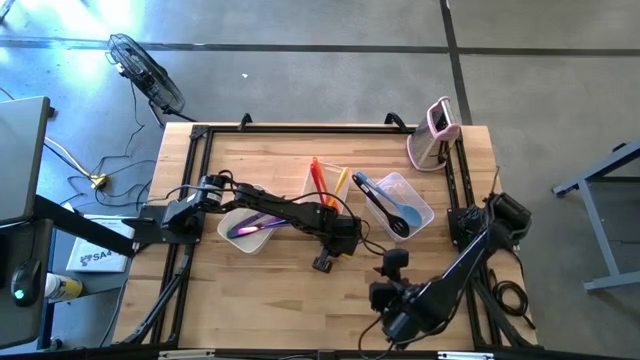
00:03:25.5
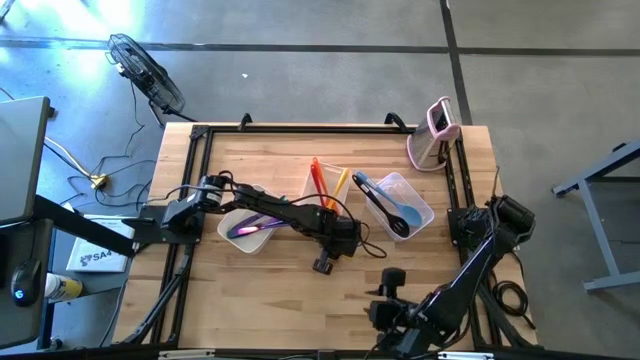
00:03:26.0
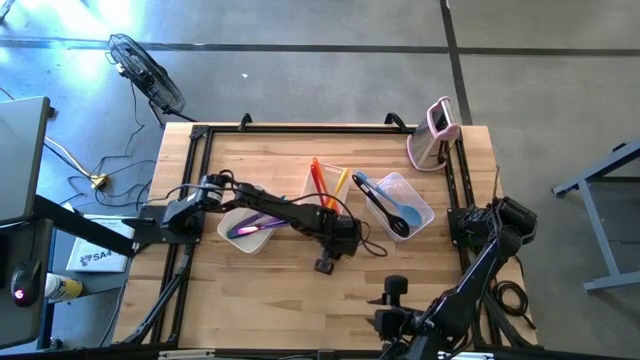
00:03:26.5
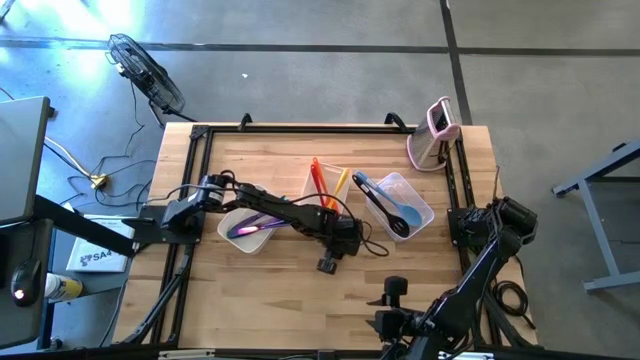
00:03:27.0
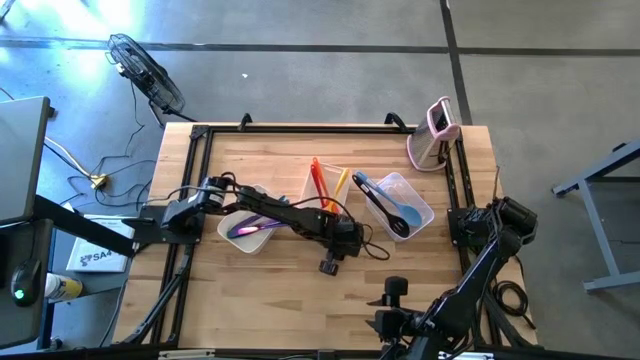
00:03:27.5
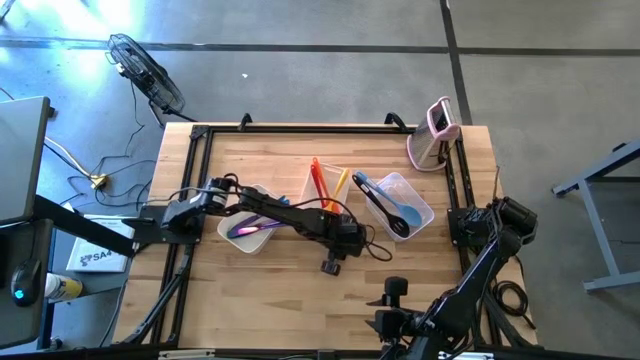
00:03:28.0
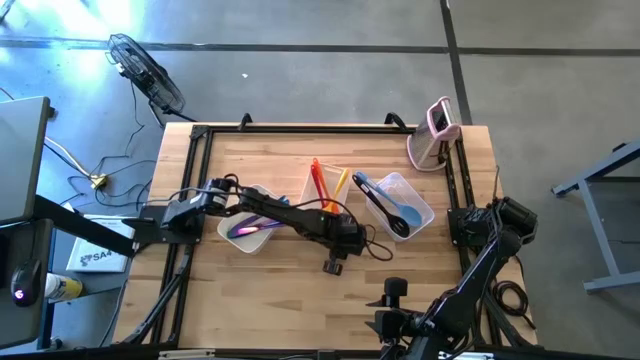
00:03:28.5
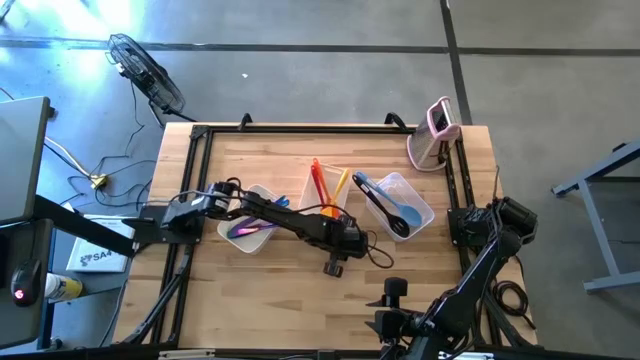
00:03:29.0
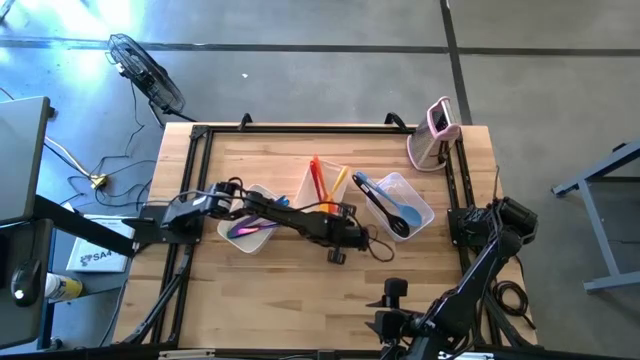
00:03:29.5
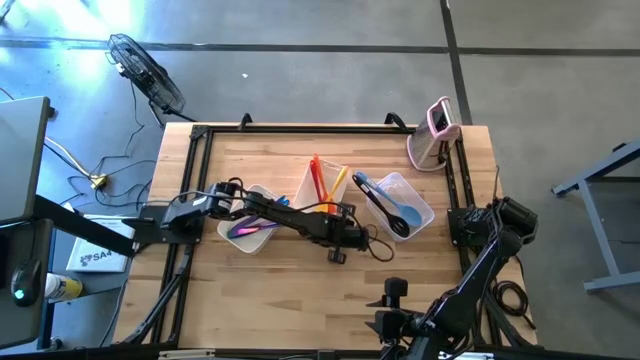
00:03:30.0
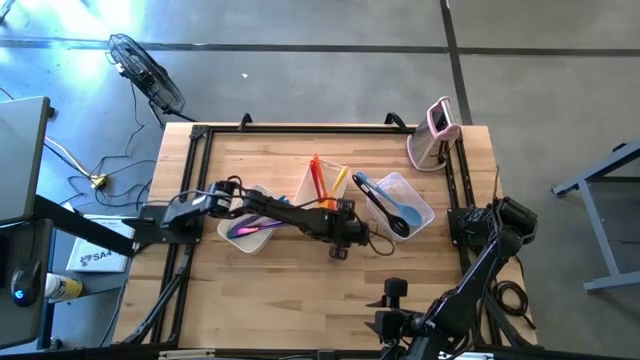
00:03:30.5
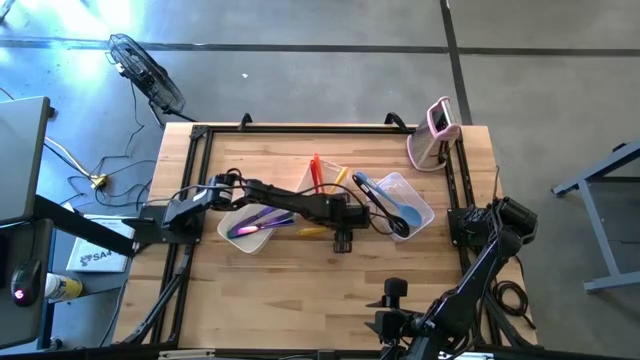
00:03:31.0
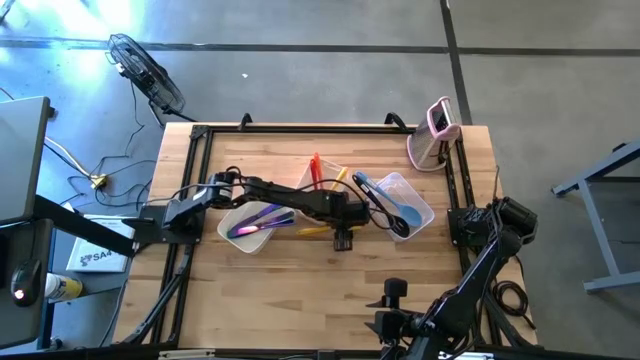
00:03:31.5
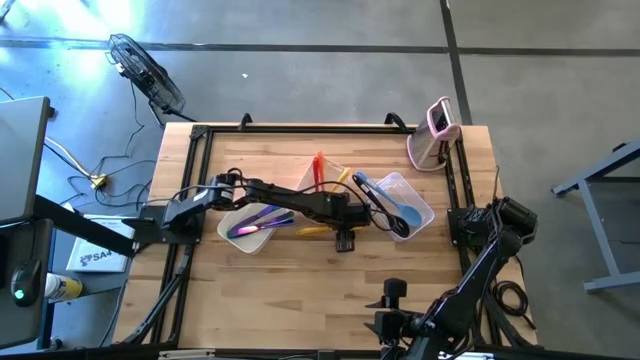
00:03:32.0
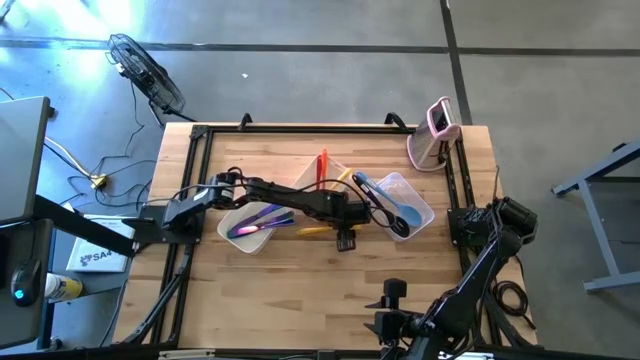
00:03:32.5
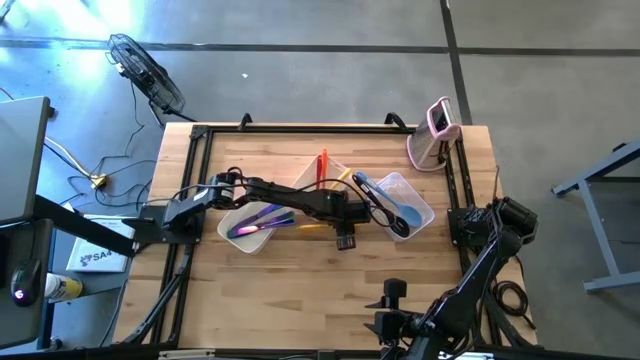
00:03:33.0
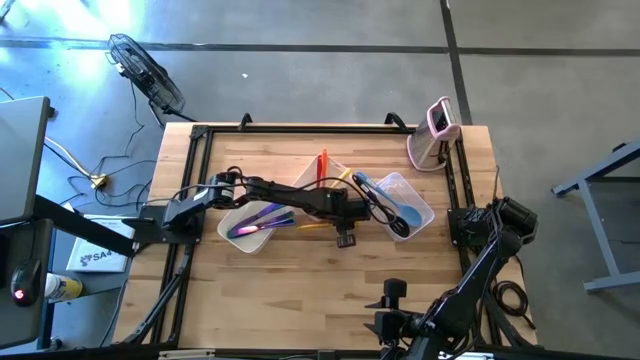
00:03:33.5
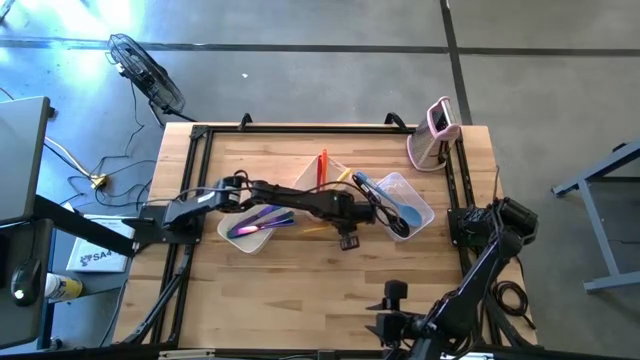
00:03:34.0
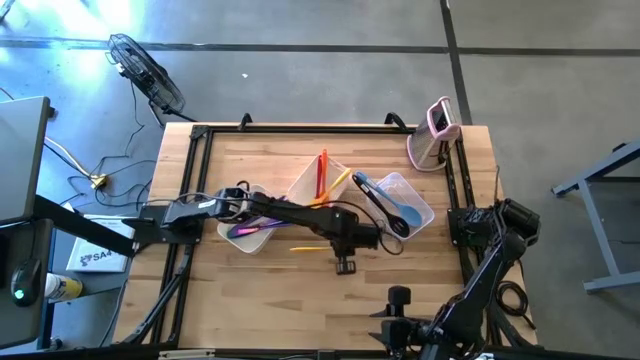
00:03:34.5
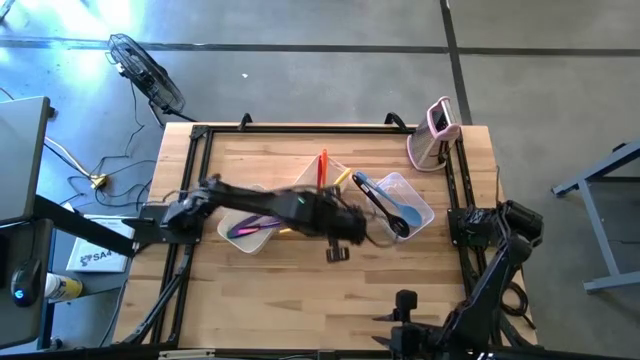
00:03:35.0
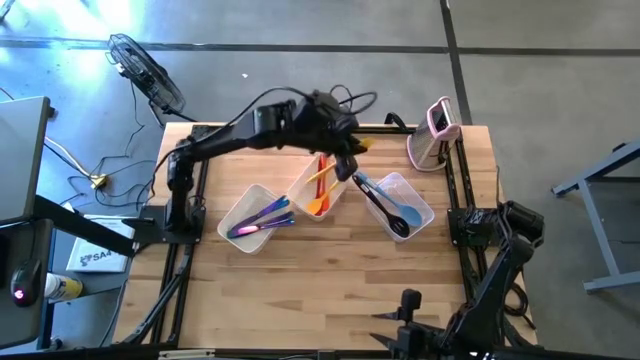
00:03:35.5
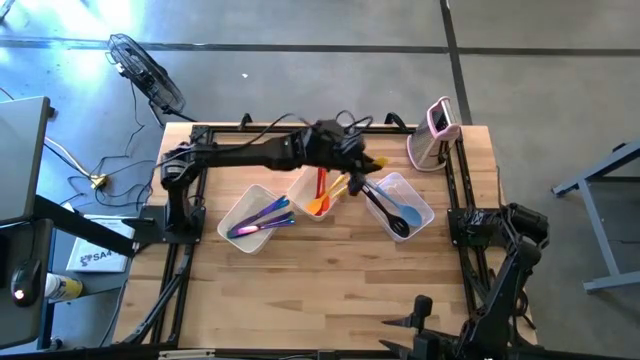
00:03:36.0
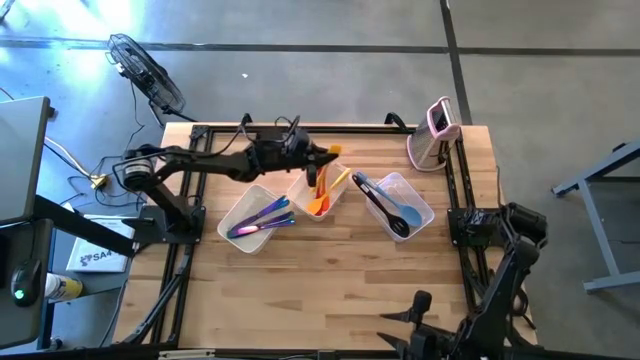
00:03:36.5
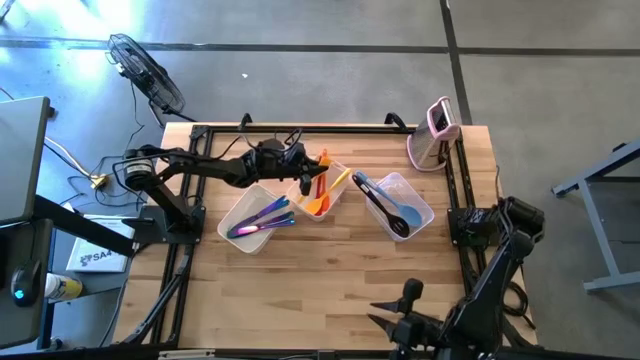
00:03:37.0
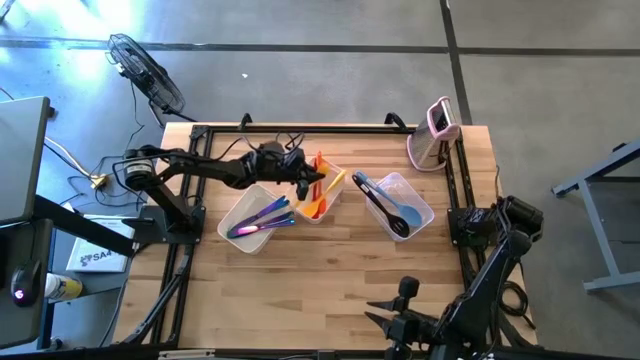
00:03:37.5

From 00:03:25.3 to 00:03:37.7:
Task: Pick & Place Kitchen Items
Put the yellow spatula into the right white bin

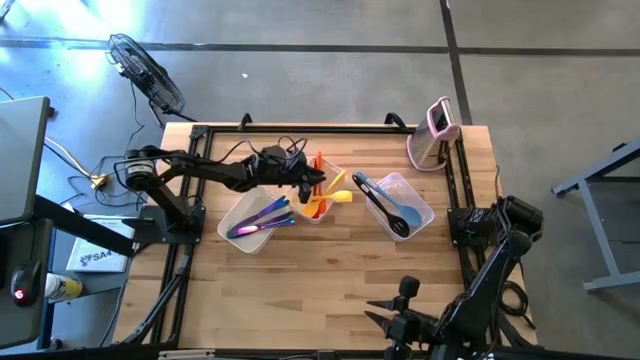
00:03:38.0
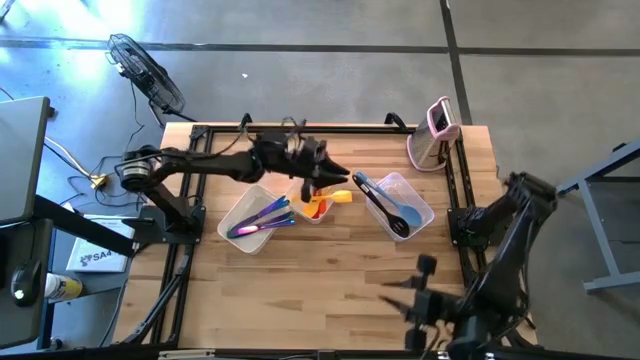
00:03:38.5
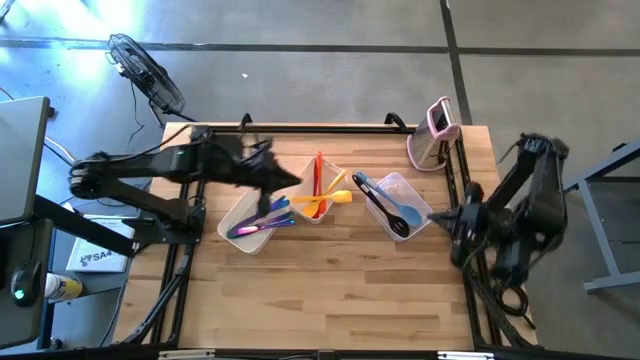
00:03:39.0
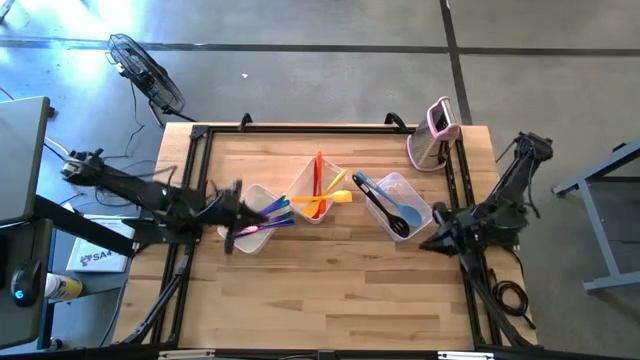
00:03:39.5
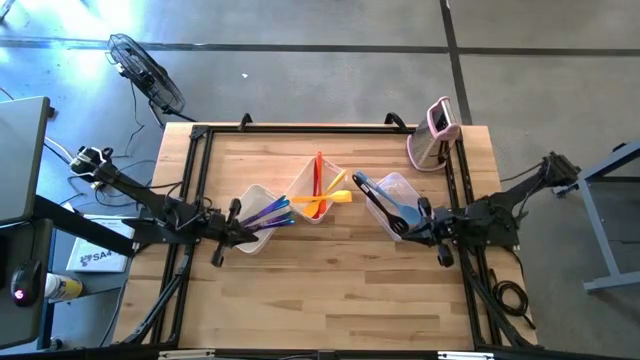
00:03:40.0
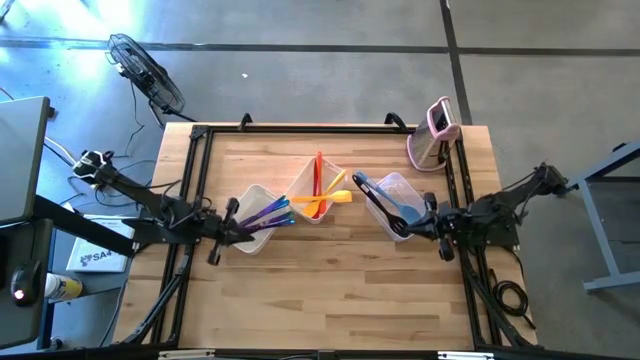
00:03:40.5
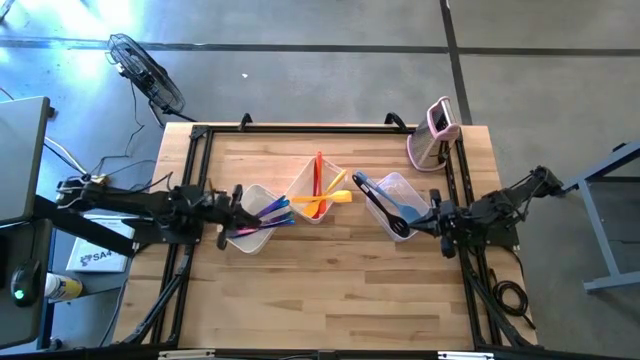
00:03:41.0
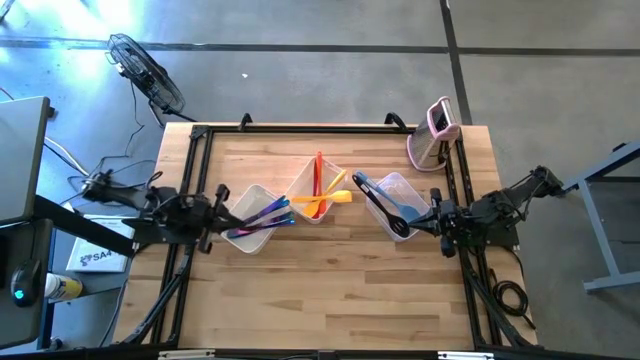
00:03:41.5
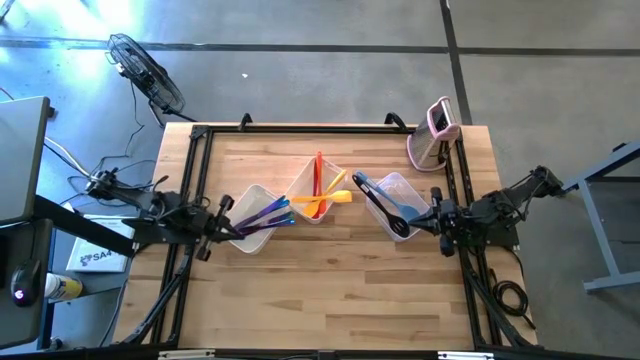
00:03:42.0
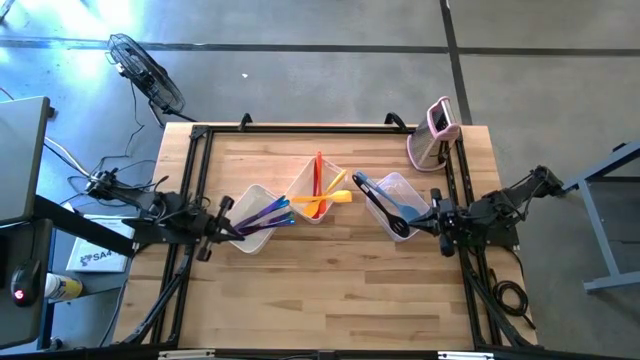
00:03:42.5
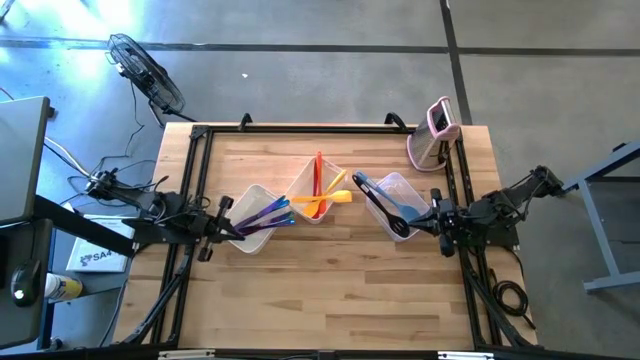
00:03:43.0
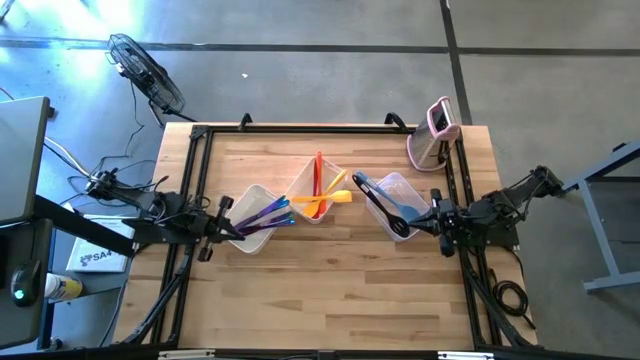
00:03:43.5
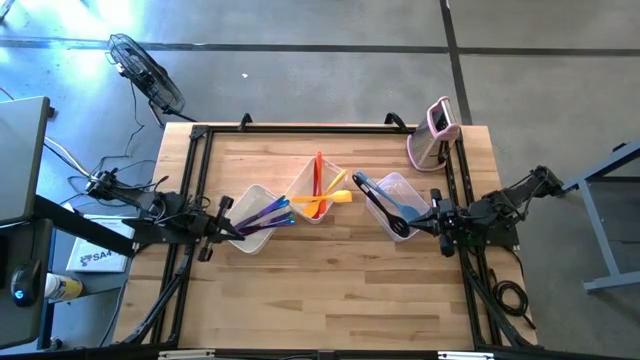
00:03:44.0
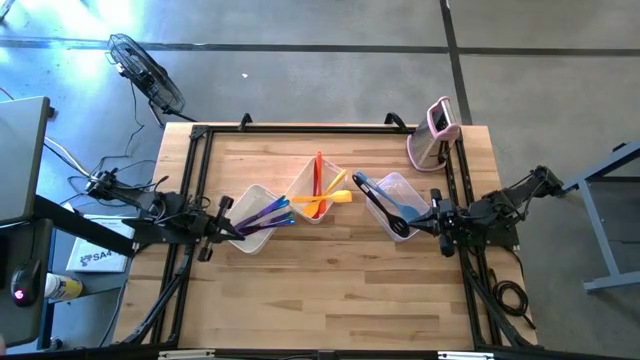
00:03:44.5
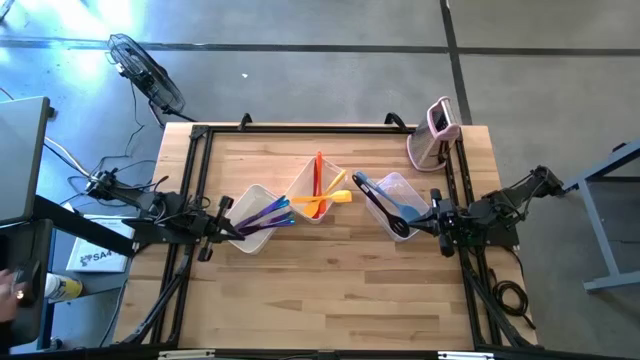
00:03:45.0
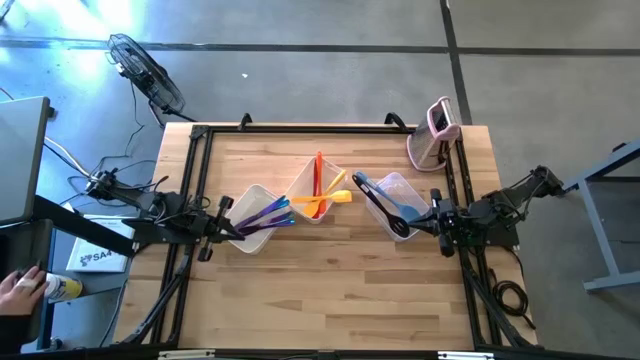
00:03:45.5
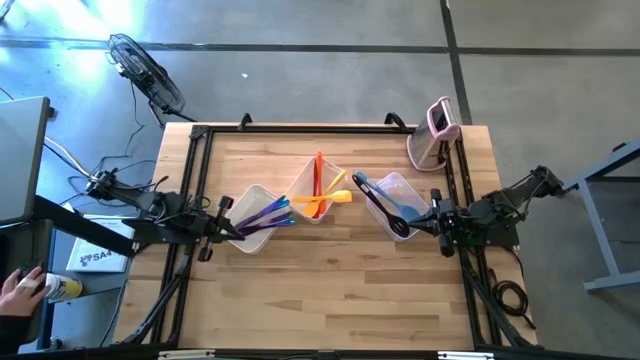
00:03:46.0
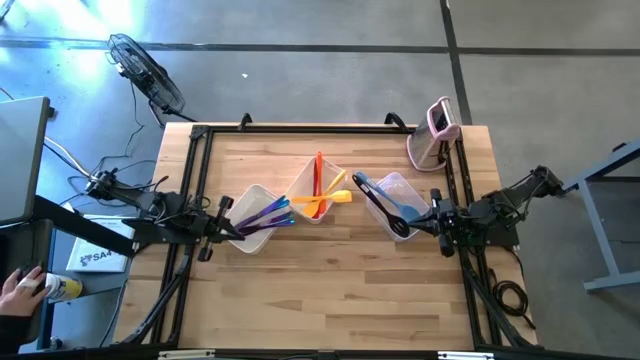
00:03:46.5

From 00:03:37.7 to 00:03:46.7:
Return to Home Position

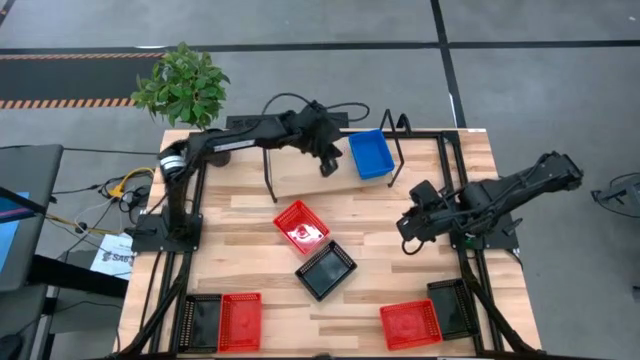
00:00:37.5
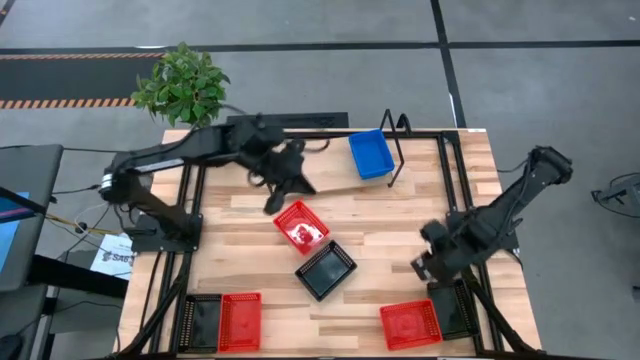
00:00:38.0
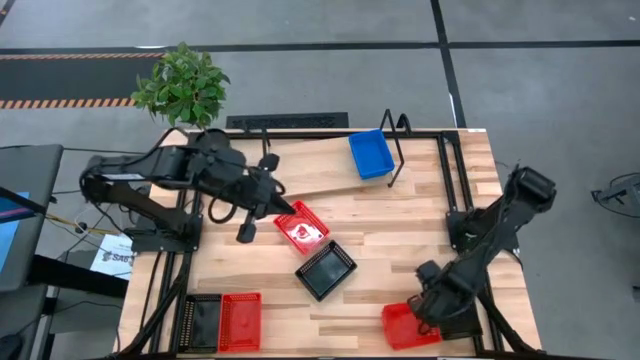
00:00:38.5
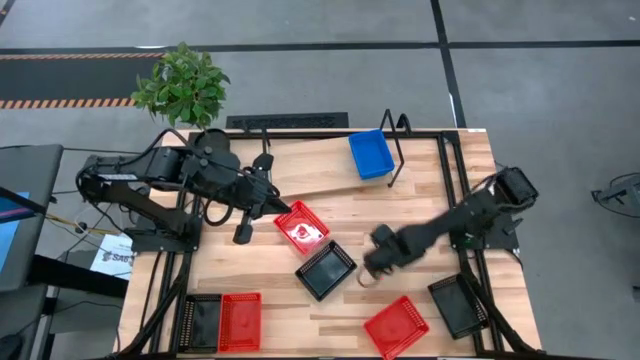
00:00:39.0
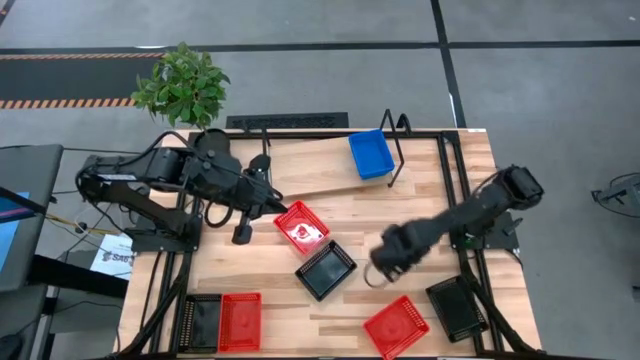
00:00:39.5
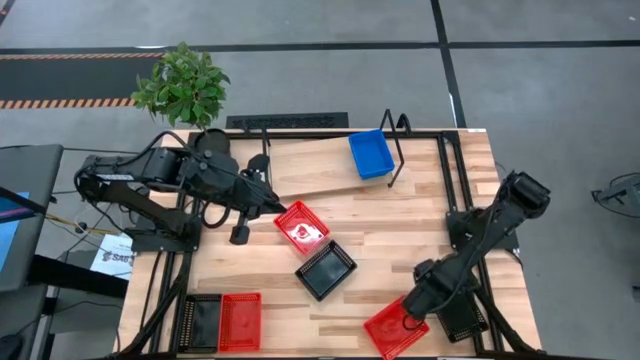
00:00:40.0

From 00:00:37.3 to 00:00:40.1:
Task: Stack baskets on shelf by color
Move the black bin from the bottom right to the center table
